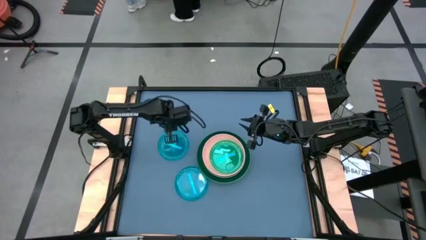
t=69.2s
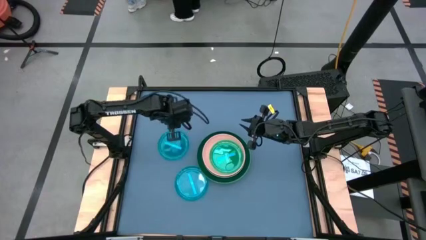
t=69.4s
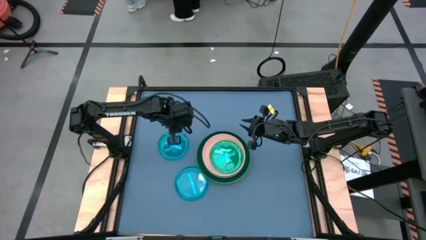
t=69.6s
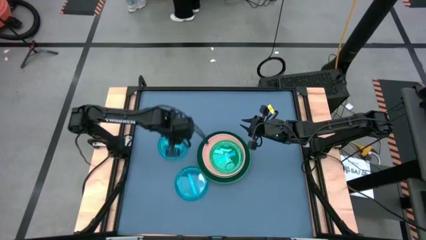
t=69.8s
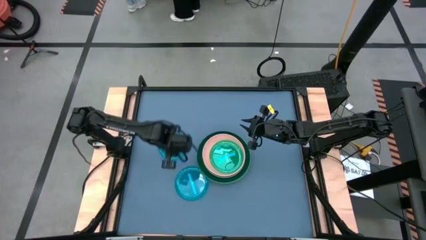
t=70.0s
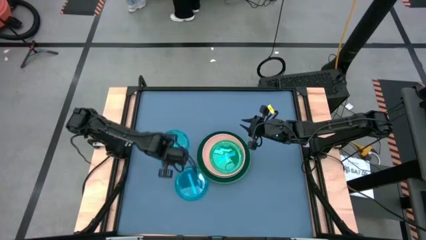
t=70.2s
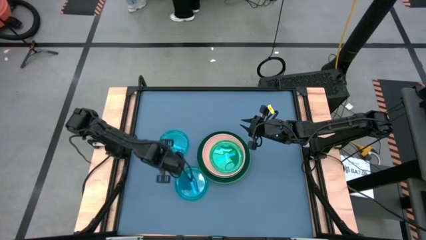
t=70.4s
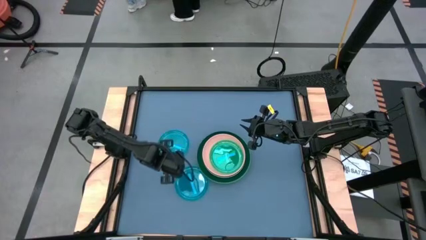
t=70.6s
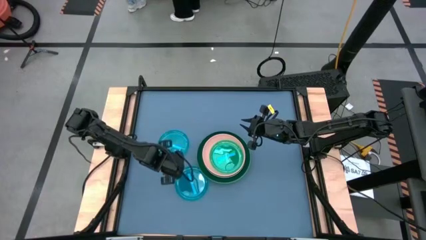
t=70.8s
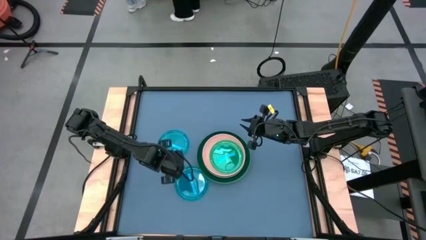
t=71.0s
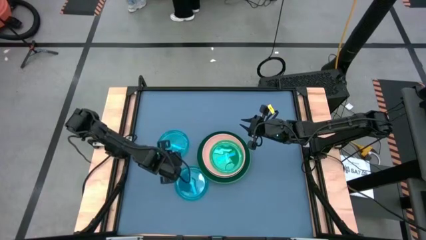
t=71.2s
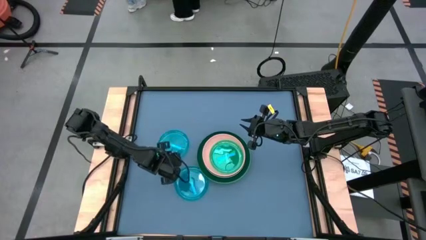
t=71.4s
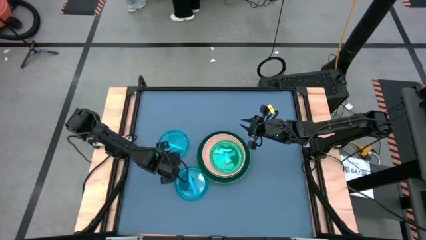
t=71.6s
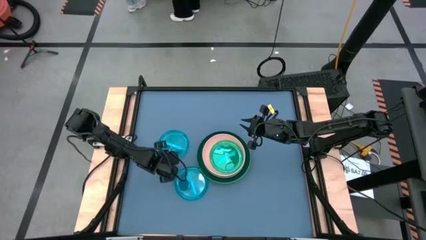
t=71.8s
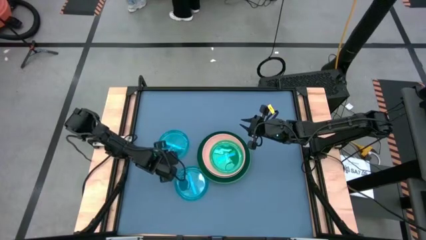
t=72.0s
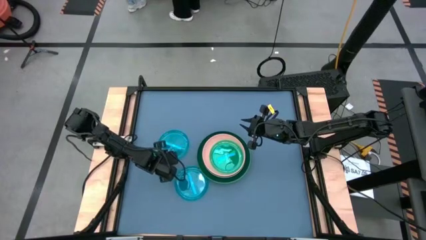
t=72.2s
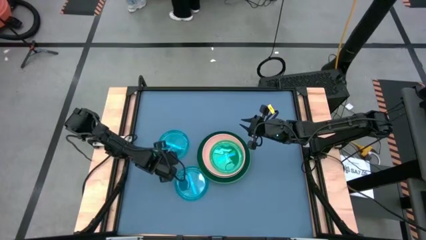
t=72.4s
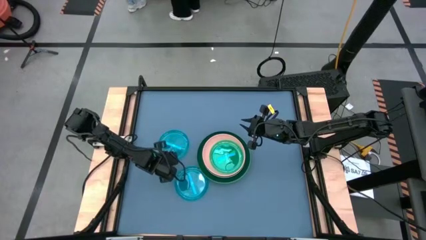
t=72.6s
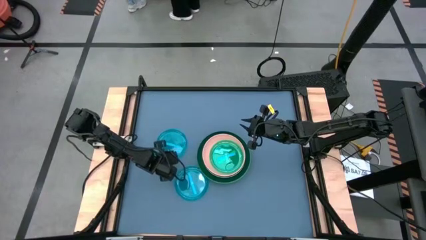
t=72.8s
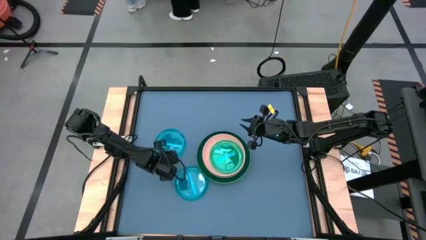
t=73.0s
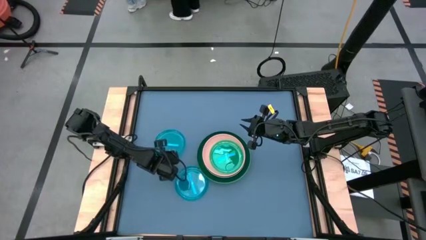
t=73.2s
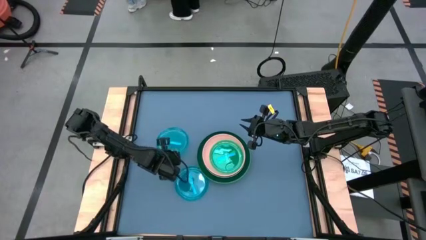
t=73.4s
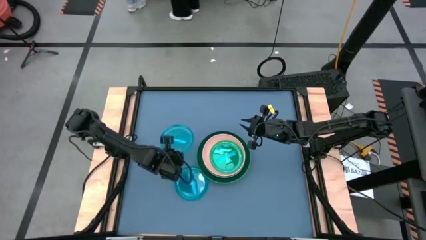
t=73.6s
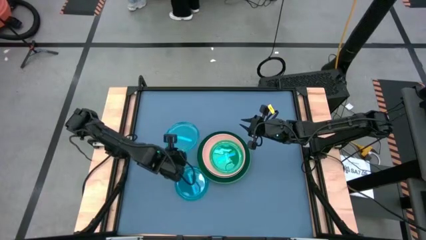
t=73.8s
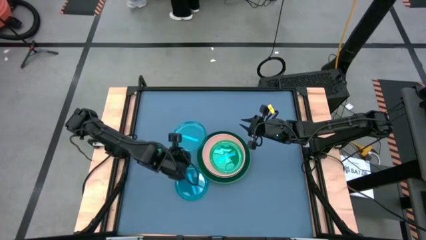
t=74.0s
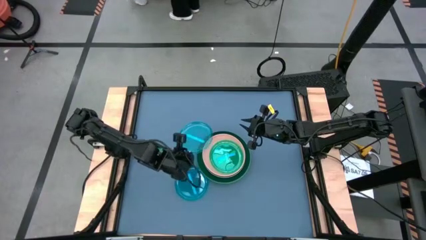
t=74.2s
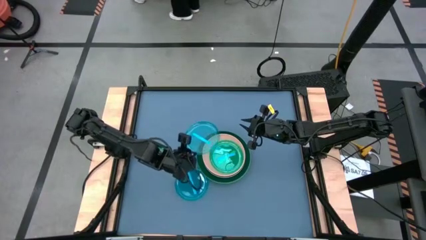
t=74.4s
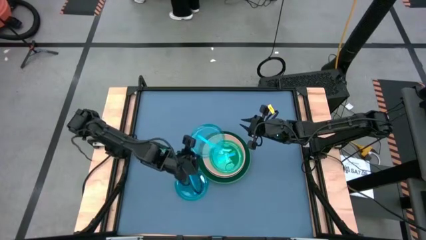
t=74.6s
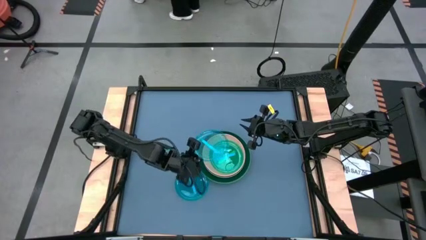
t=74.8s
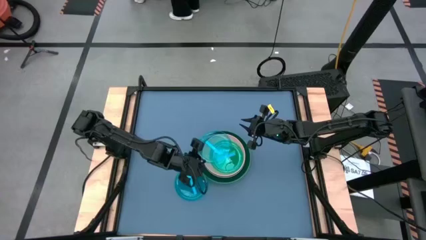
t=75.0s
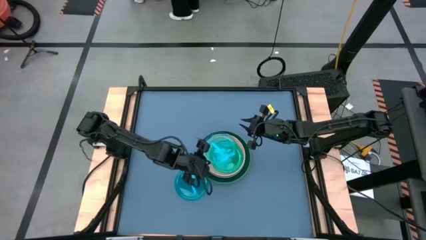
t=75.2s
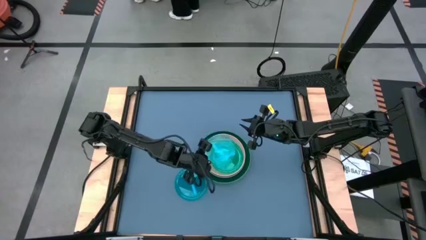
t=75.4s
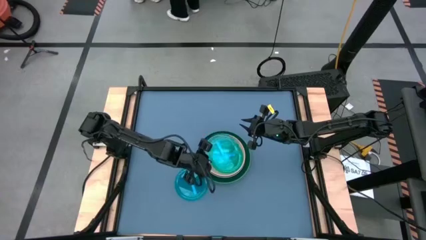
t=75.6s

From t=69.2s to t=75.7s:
Task: Stack plastic plates
Stack the top blue plate on top of the blue plate

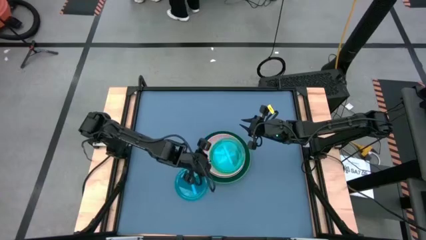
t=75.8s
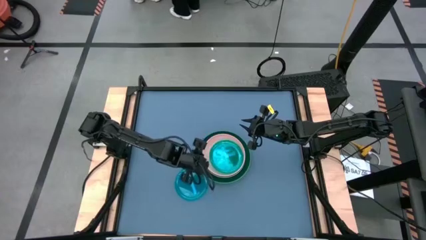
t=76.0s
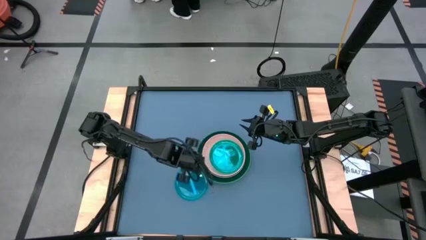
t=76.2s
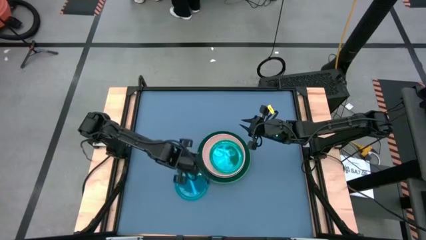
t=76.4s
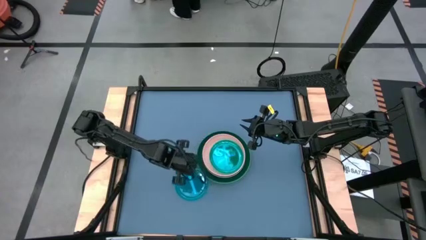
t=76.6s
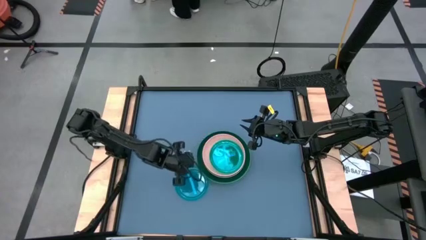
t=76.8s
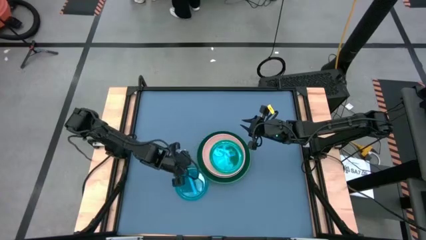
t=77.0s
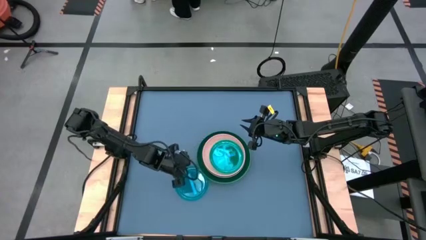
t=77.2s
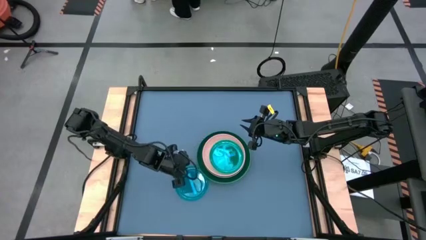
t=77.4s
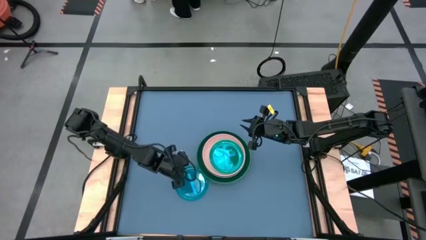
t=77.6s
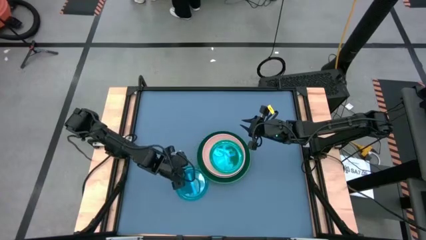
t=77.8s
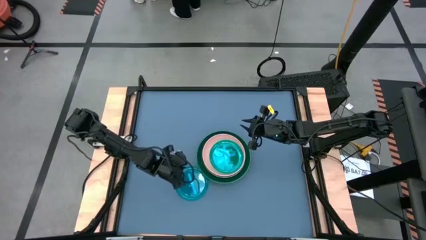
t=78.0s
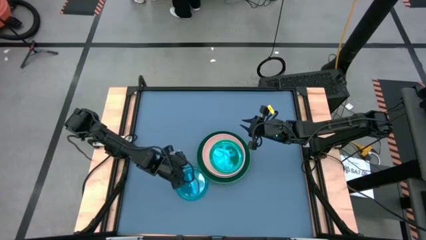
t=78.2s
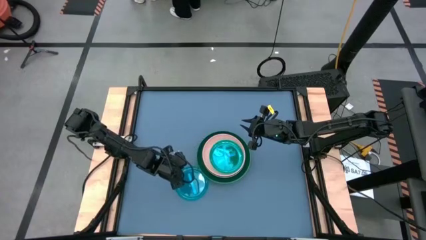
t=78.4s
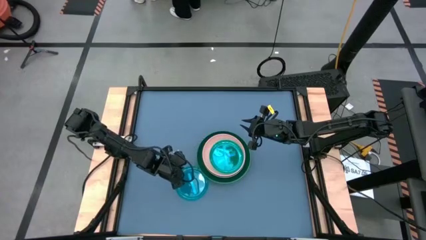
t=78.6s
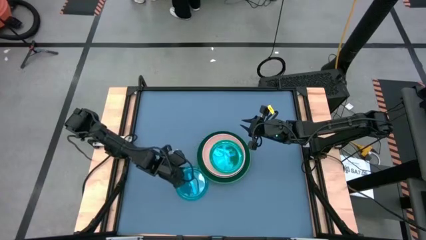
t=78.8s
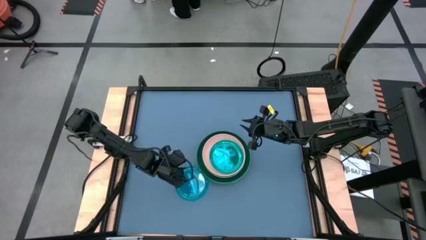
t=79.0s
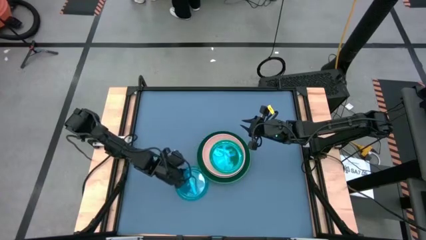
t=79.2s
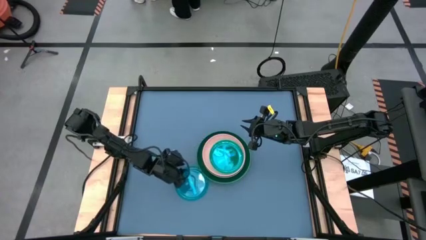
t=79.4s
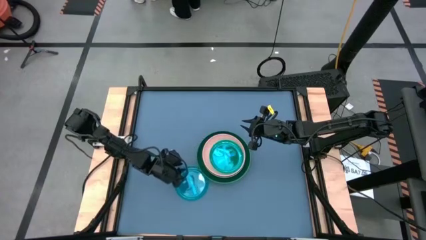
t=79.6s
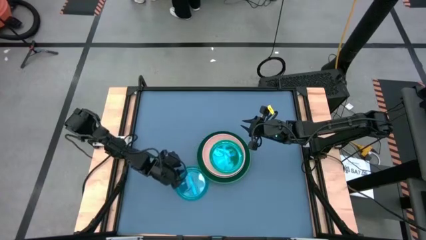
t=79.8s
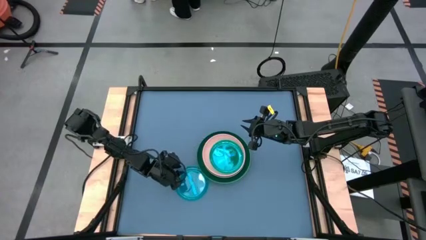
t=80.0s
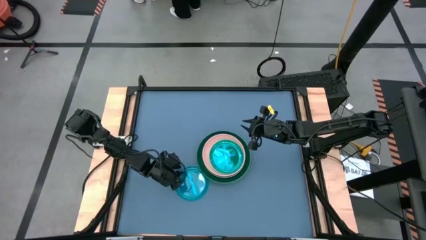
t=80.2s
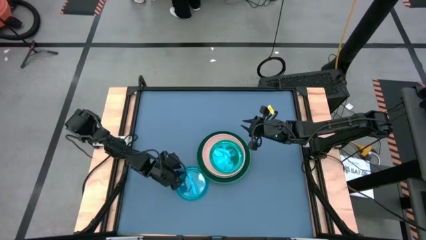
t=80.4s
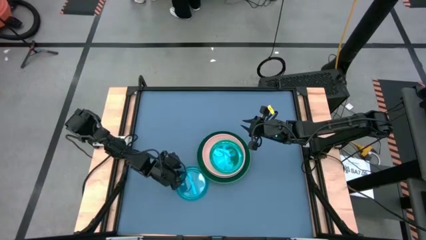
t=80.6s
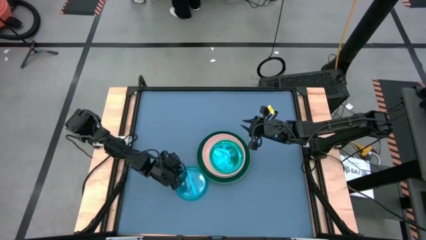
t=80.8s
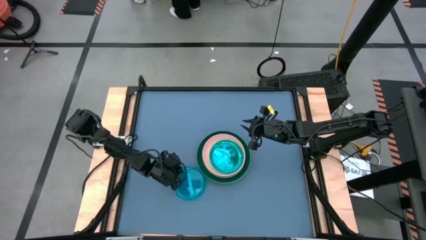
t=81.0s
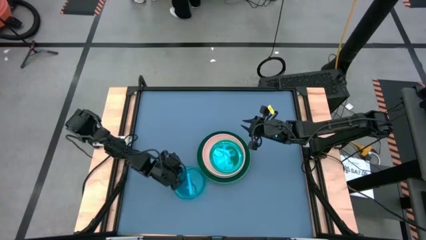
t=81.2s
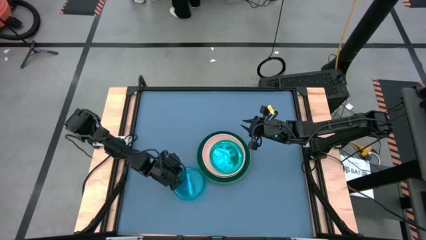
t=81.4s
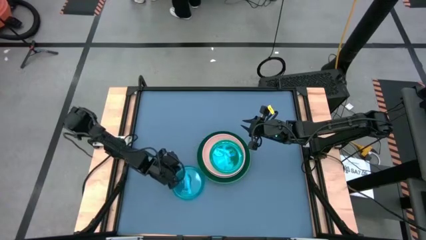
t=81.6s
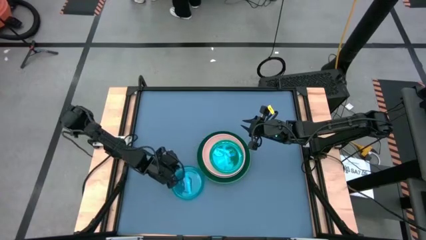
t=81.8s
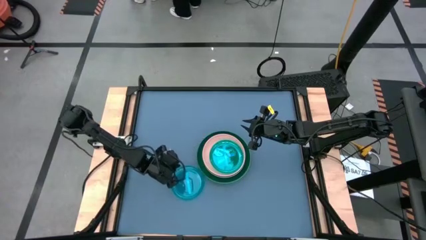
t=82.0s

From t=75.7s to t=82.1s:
Stack the blue plate on top of the blue plate

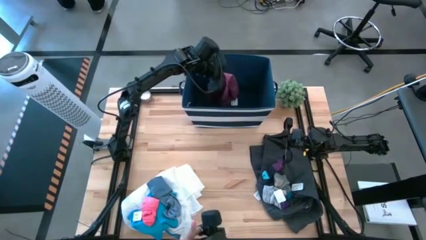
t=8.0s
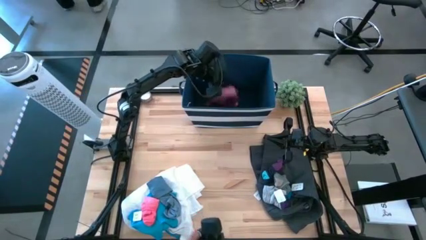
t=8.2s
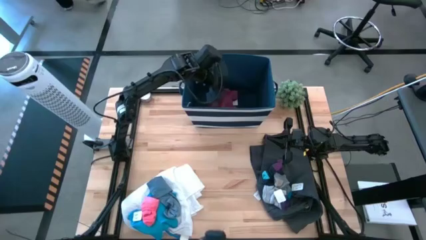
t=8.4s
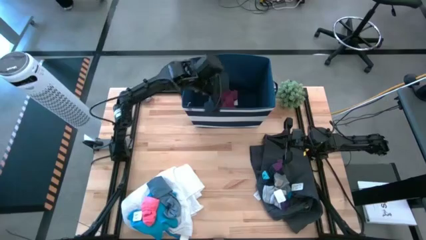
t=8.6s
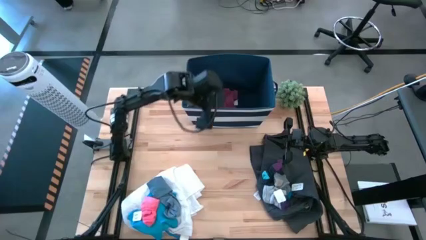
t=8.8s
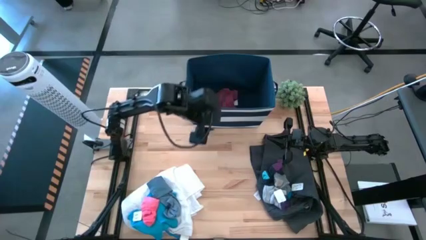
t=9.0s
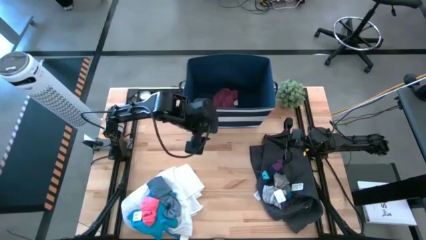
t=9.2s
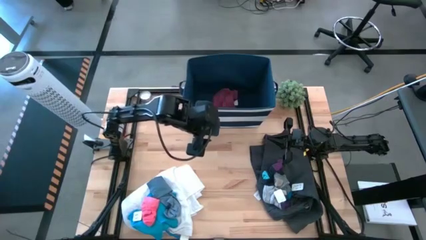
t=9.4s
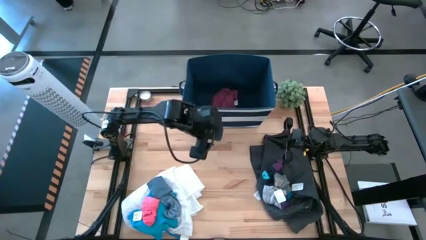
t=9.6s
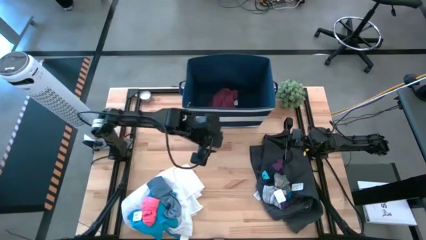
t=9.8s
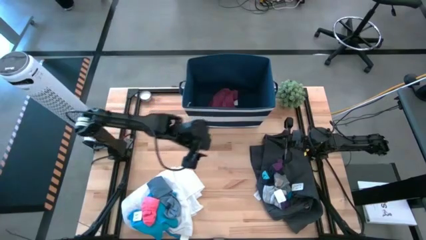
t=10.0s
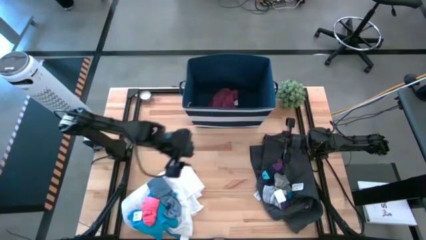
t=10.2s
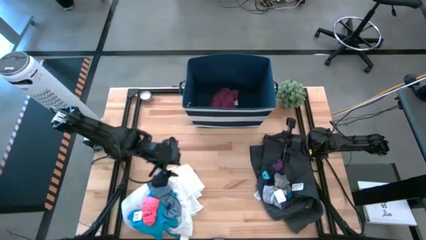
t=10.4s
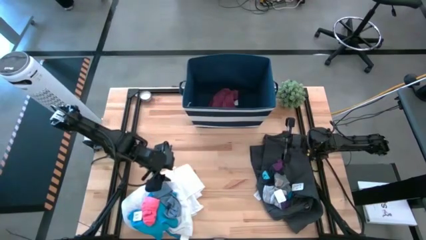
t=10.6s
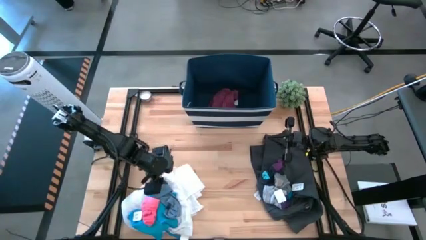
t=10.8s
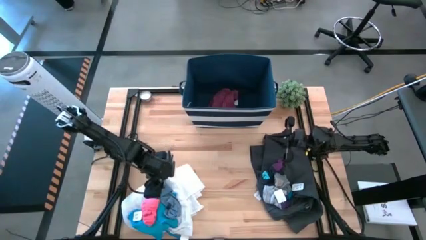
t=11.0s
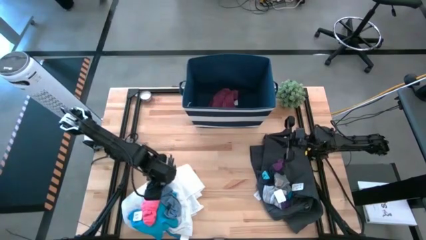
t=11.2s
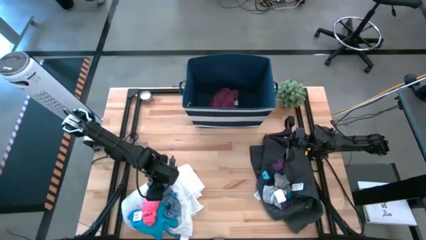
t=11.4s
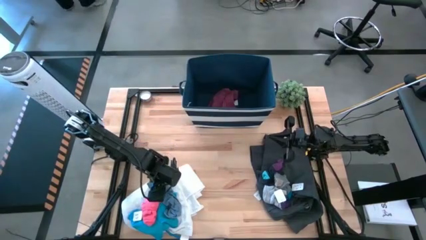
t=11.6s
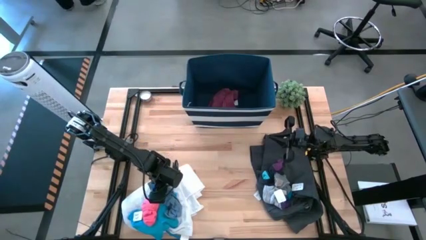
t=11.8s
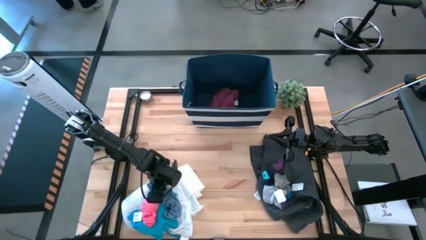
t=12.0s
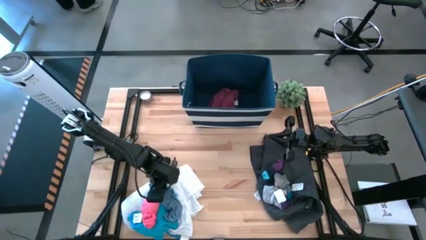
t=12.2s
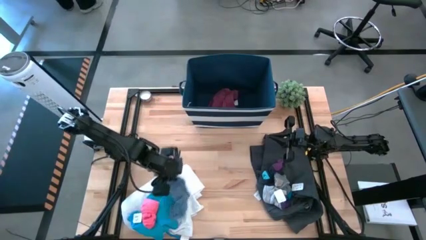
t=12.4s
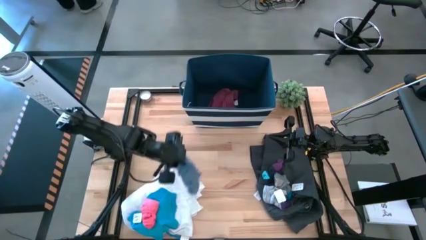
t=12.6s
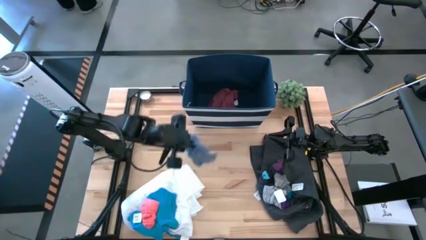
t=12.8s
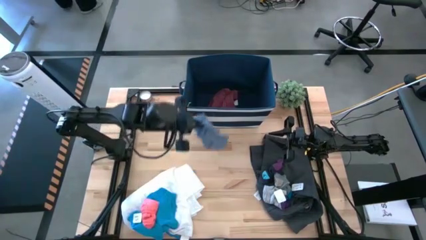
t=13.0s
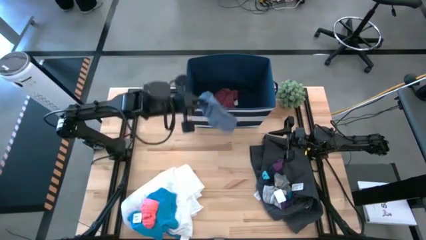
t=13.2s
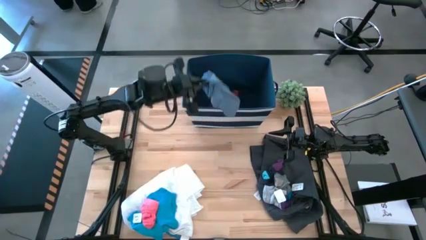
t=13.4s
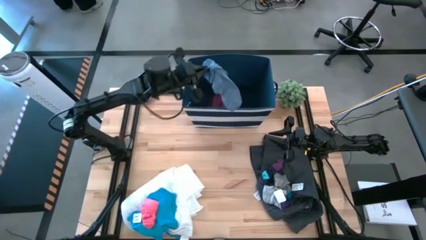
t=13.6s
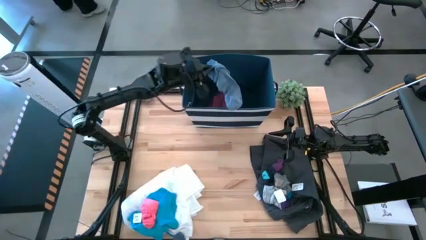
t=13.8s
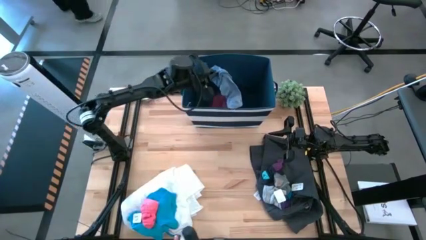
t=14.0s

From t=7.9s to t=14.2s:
Task: Sort clothes
Put the blue sock into the blue bin
